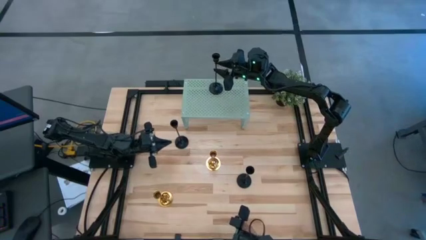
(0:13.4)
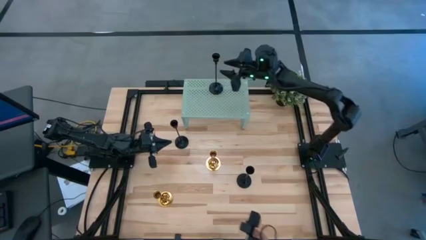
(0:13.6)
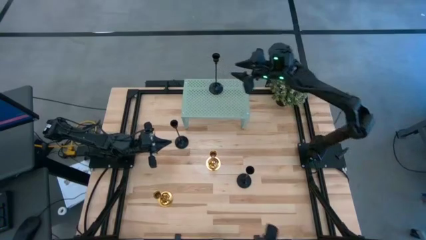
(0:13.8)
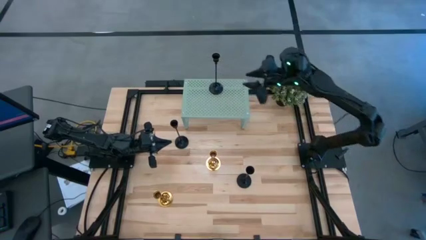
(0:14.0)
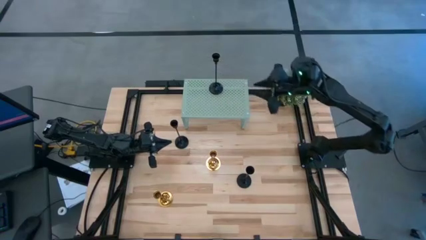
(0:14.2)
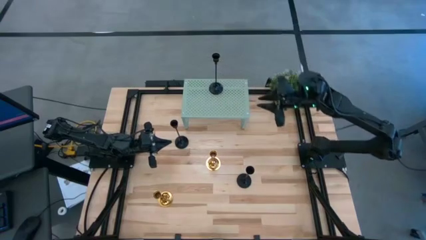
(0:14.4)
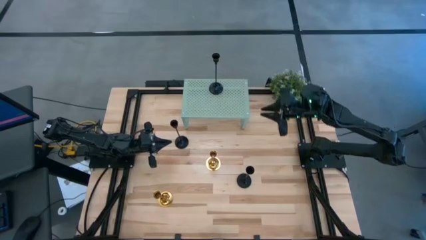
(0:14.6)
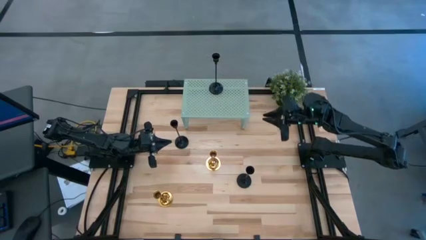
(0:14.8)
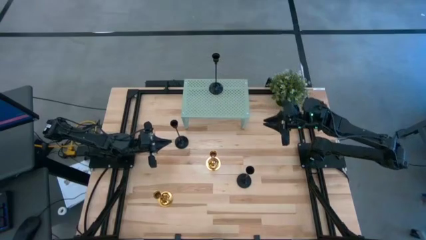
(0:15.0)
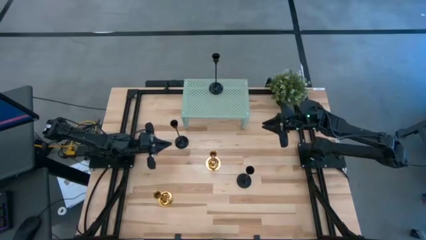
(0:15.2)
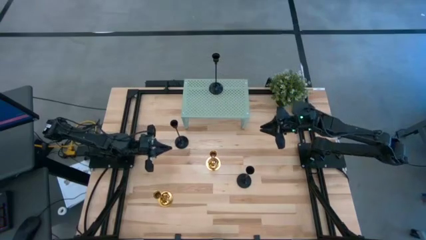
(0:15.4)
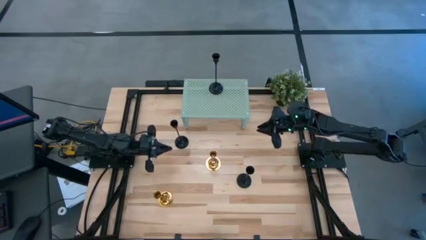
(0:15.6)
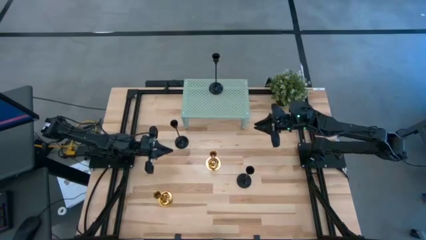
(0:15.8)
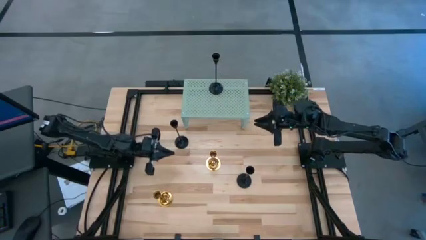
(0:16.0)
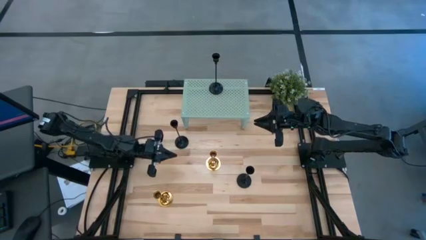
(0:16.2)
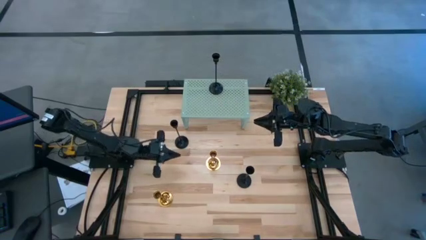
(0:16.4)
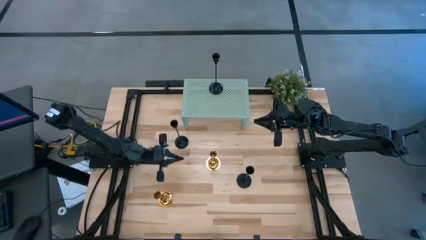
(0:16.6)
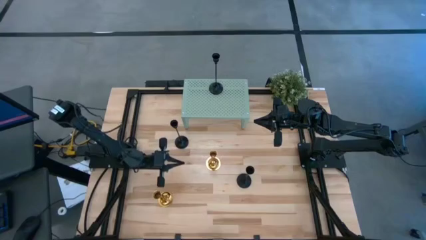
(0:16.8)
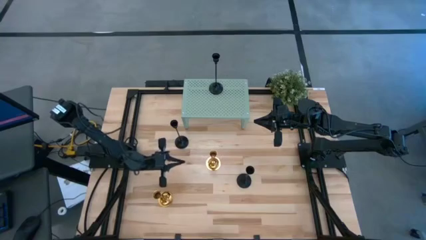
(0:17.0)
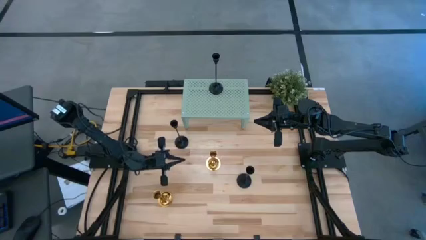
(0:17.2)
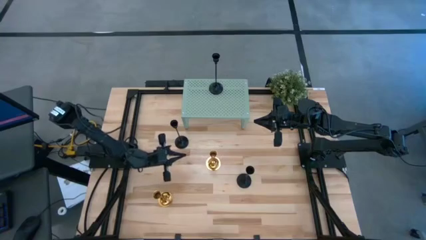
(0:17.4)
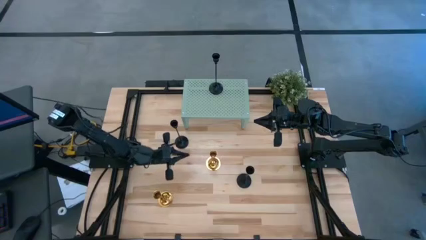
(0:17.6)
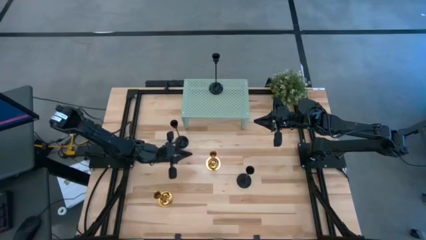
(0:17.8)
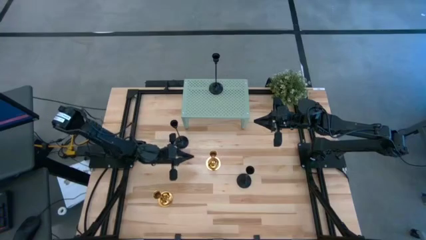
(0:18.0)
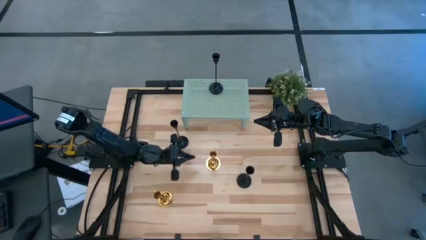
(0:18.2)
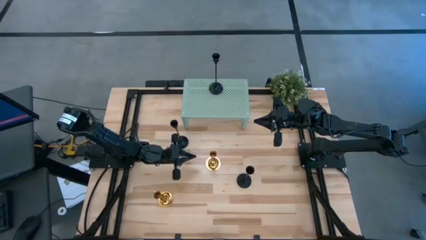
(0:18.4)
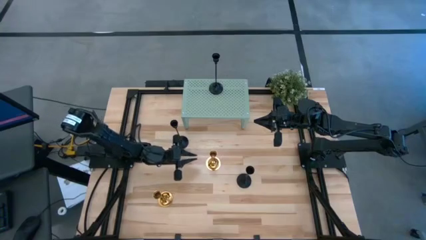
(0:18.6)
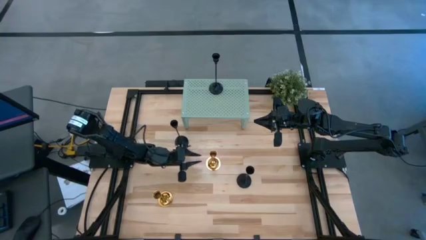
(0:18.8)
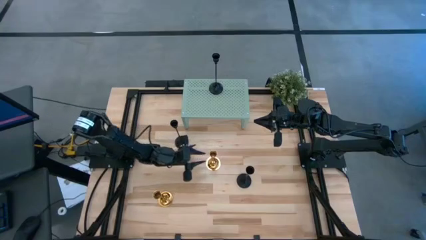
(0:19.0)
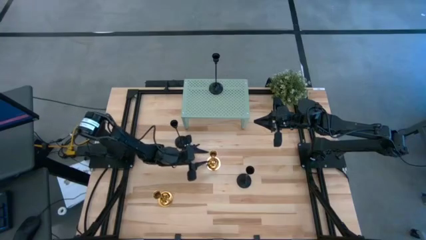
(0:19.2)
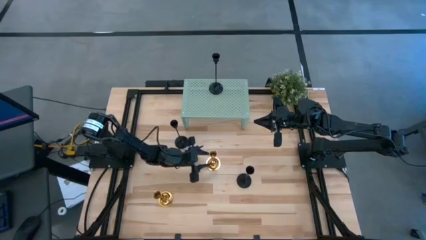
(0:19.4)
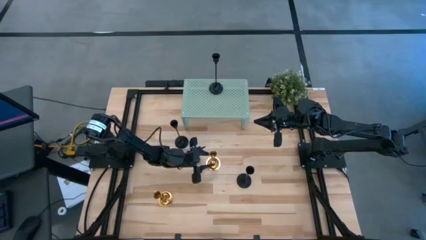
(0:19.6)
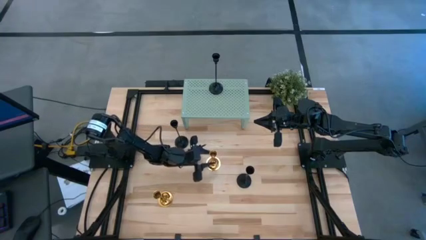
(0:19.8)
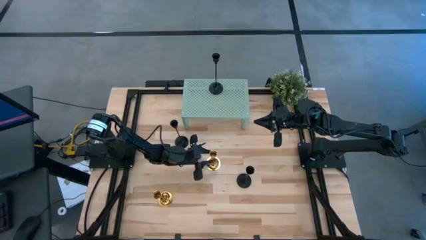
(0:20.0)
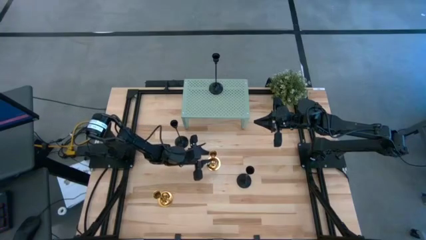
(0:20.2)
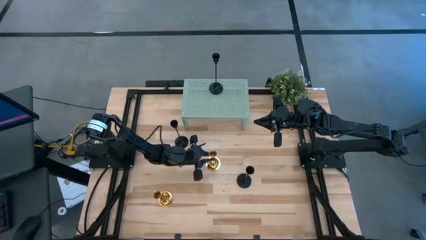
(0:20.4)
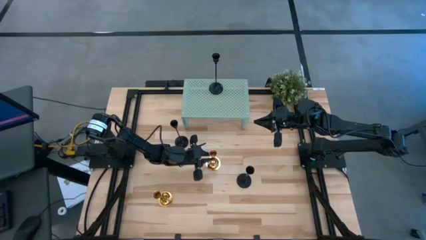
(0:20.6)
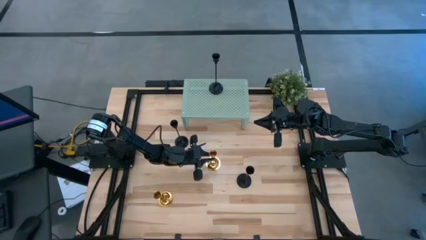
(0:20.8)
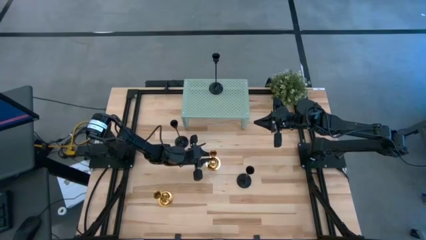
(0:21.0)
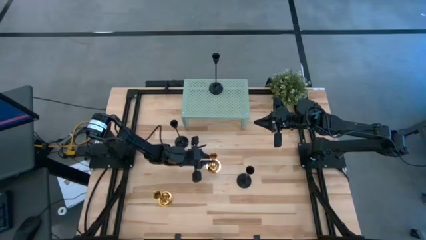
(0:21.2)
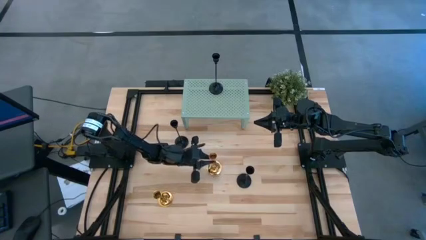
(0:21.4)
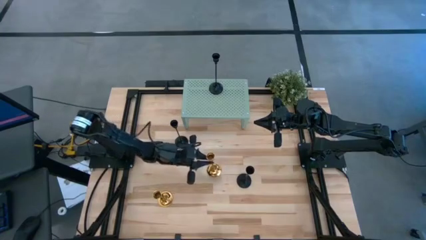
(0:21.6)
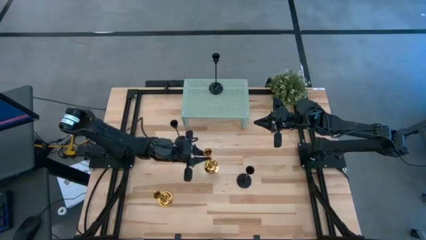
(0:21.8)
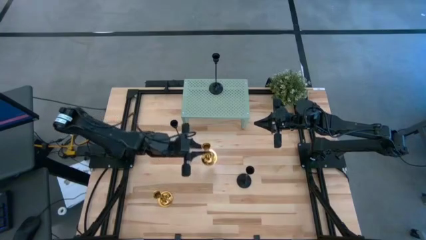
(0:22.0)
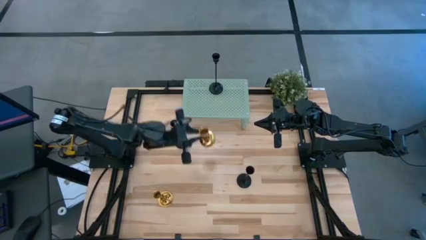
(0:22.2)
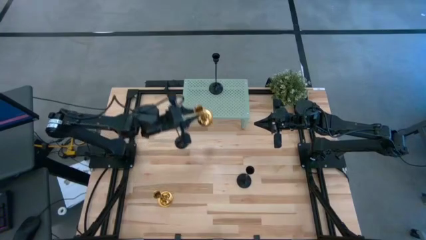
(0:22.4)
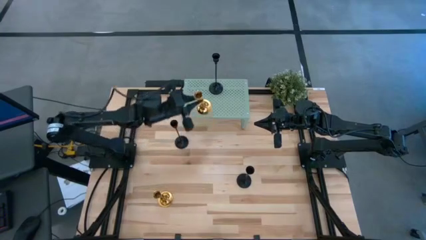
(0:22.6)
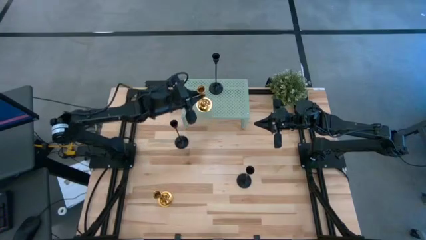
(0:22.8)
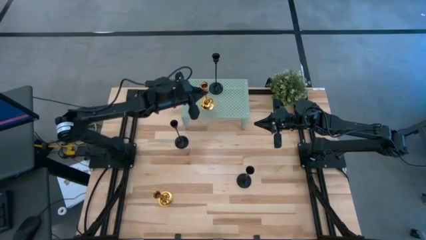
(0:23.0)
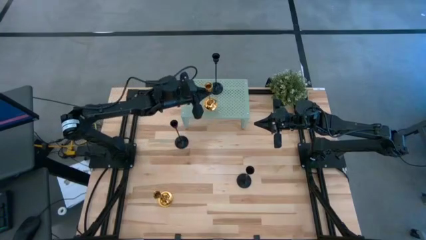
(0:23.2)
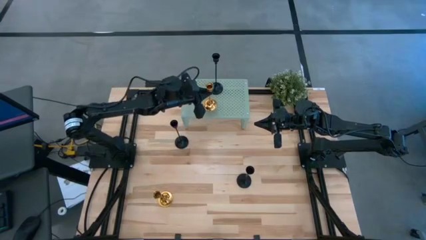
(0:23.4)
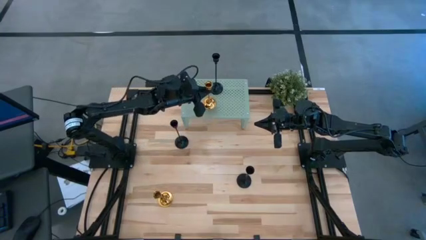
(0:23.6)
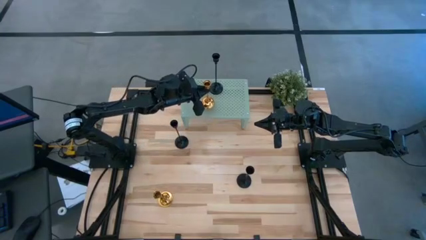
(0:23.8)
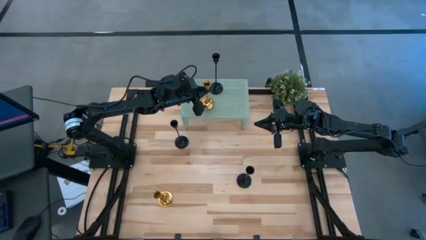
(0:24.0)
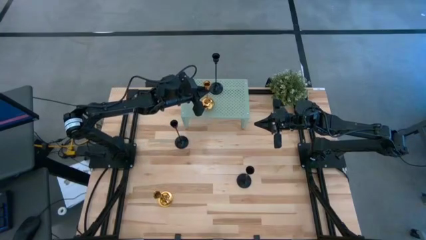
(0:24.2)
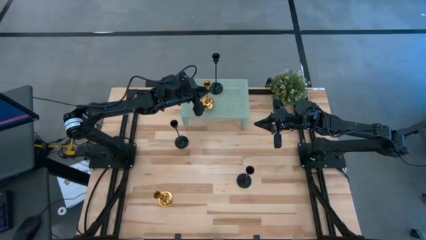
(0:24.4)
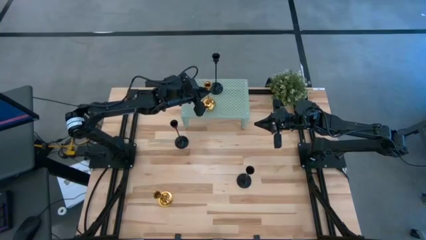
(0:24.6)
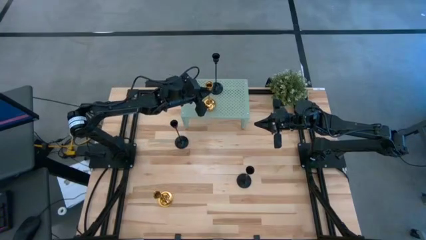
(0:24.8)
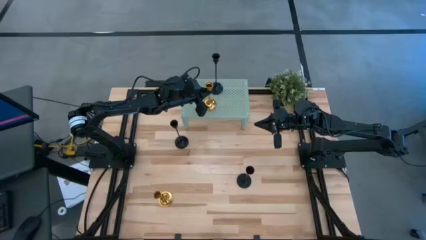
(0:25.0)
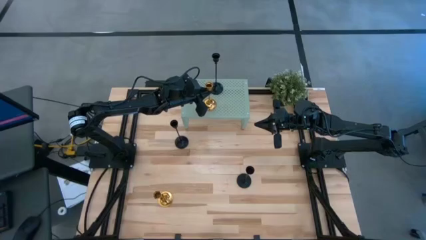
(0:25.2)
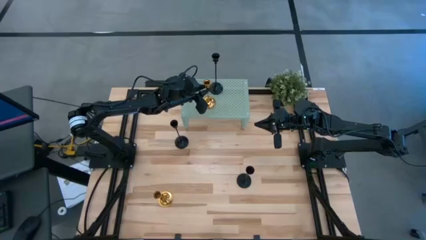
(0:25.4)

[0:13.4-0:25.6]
Task: Pick & Place candle stick holders
Put the right gold candle holder on the shelf
